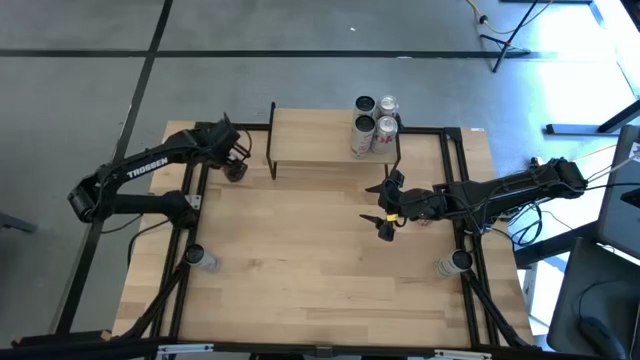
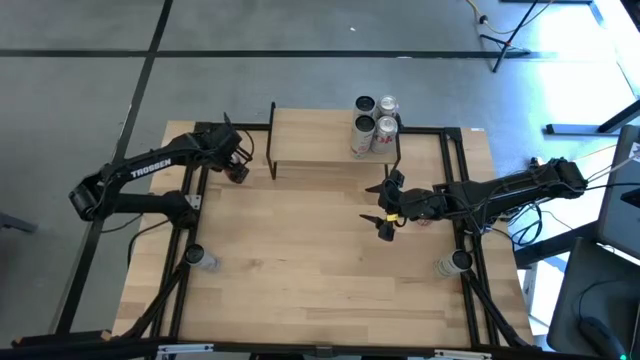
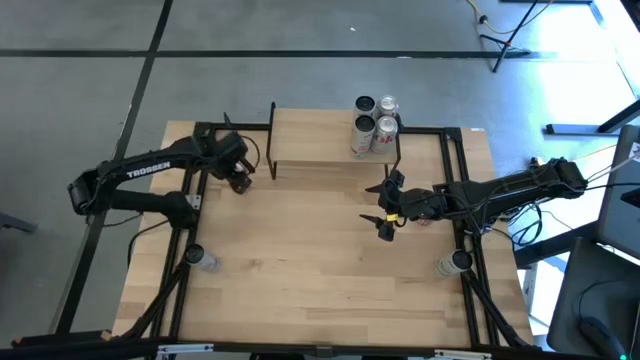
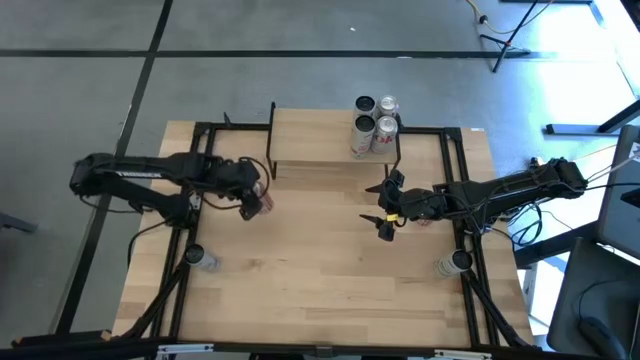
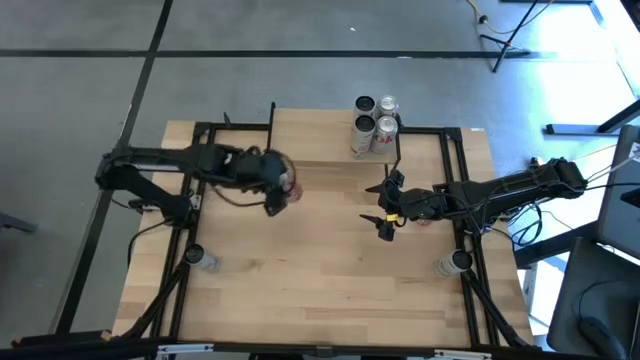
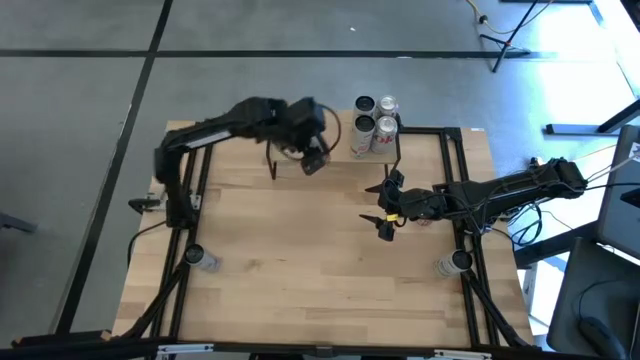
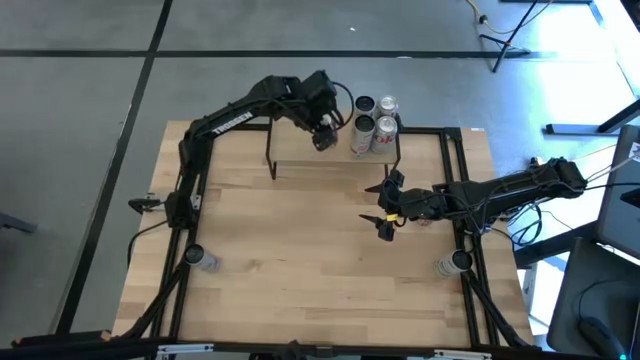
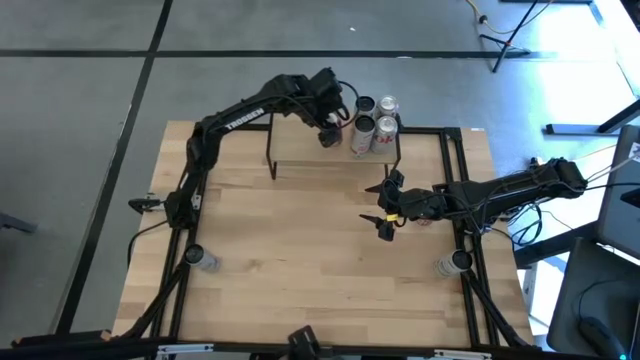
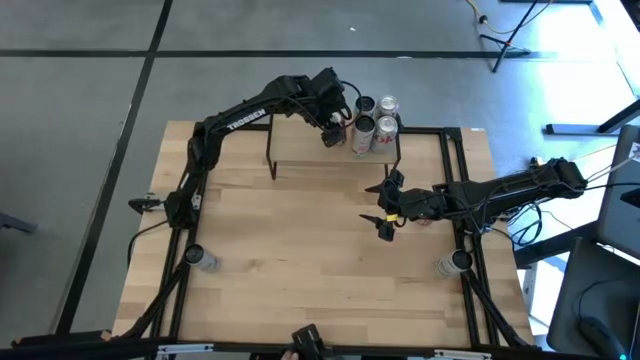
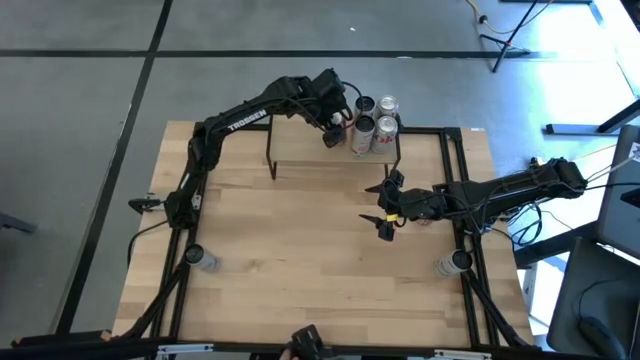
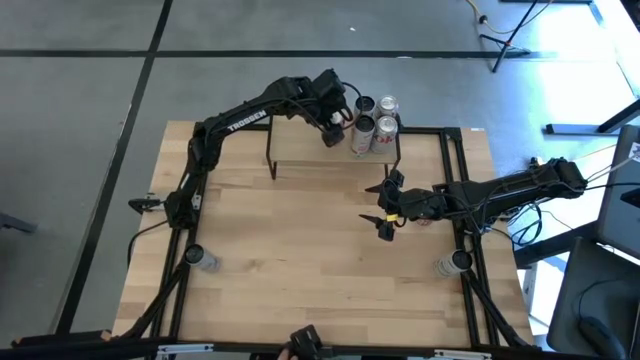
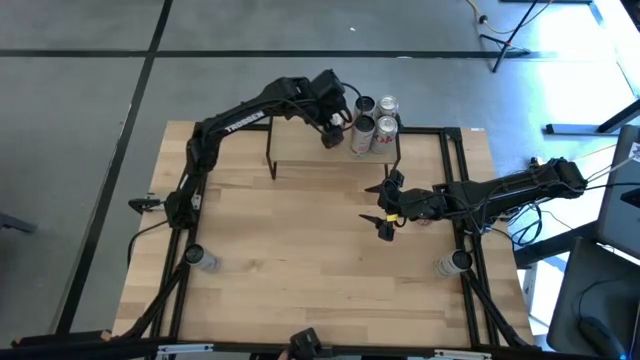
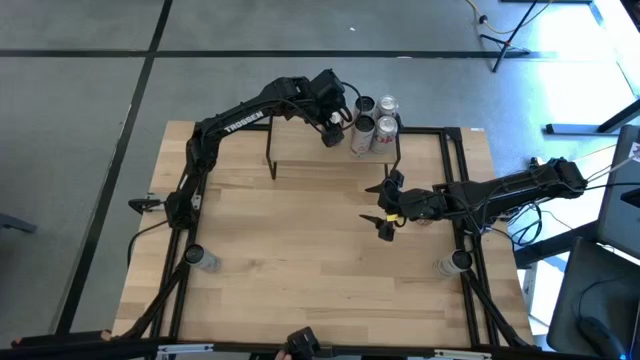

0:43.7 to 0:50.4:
Task: Place canned beverage on shelf
Put the left black-red soda can on the shelf

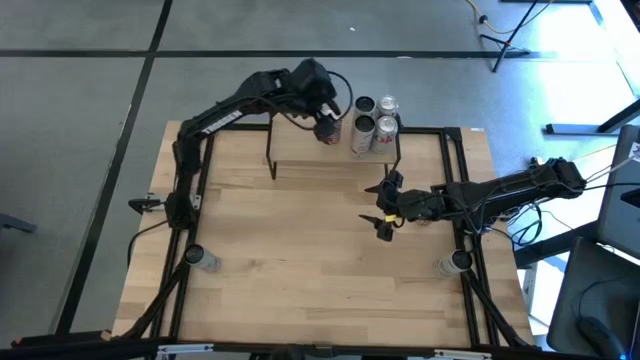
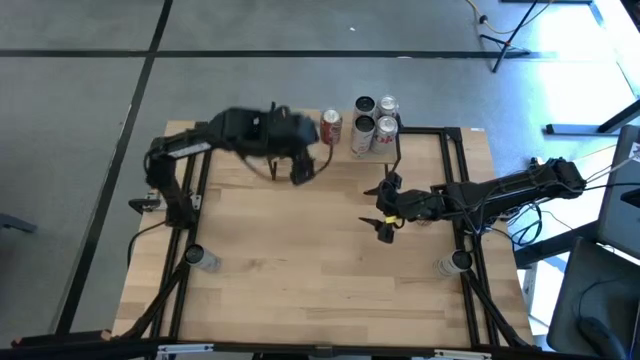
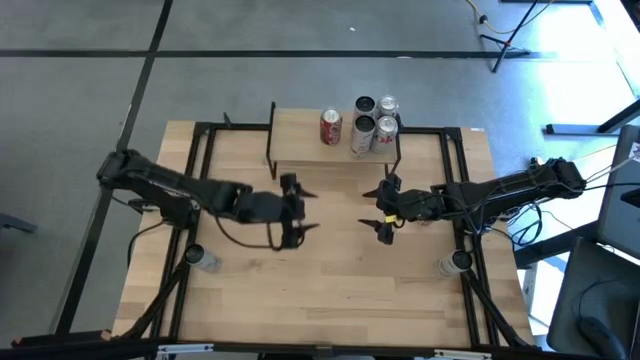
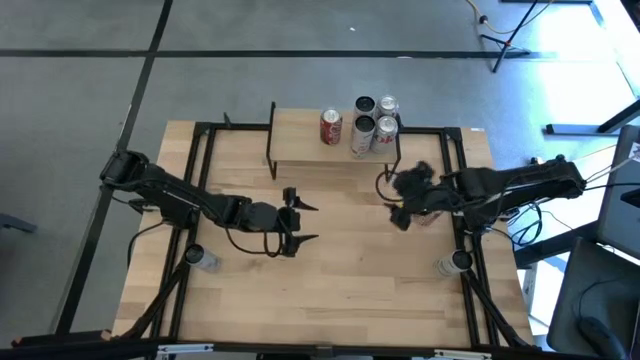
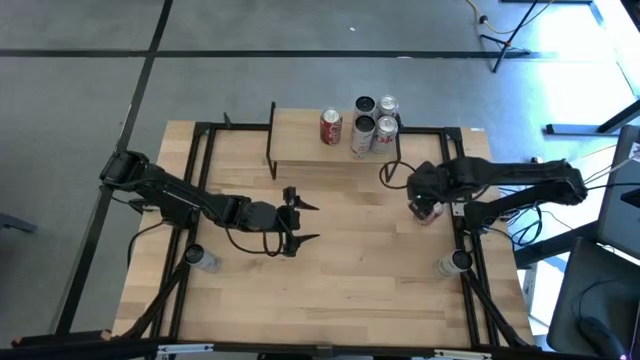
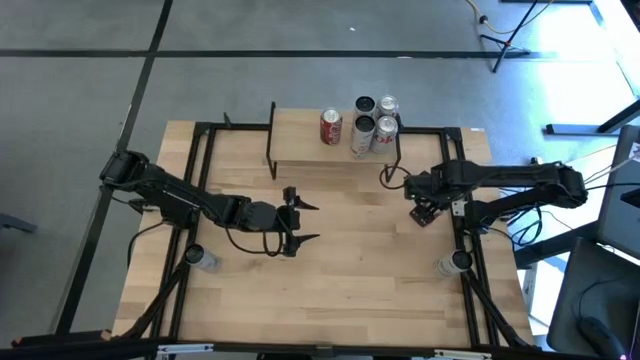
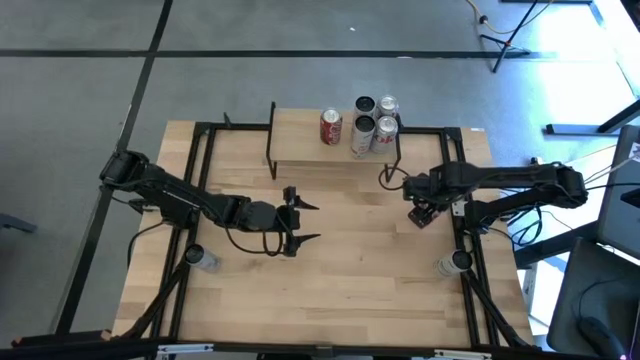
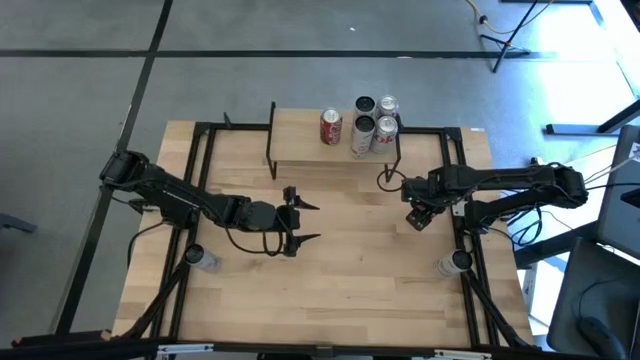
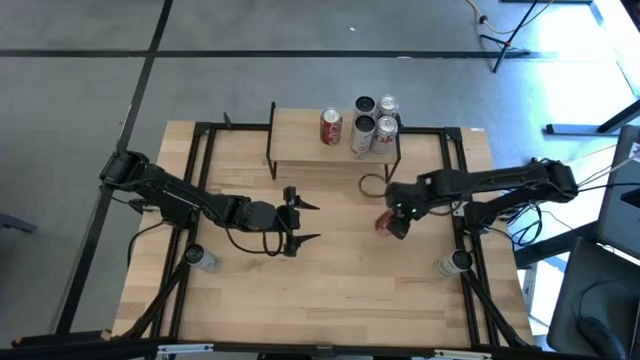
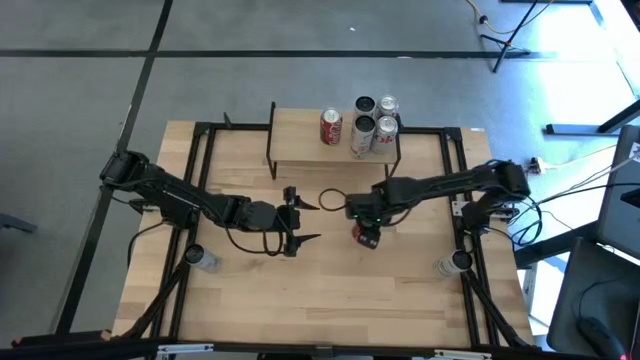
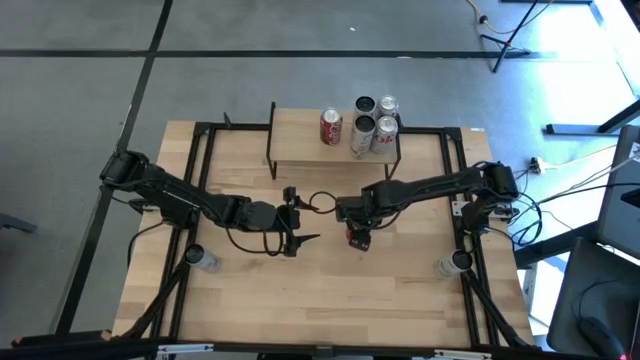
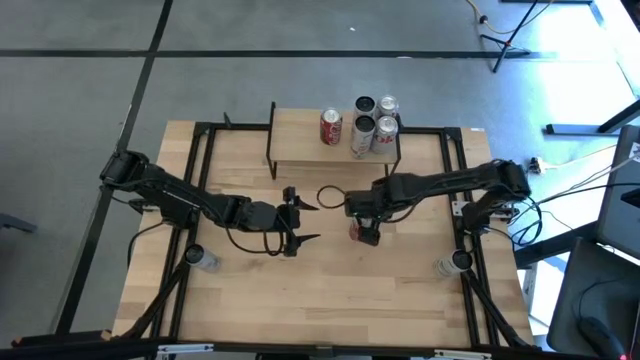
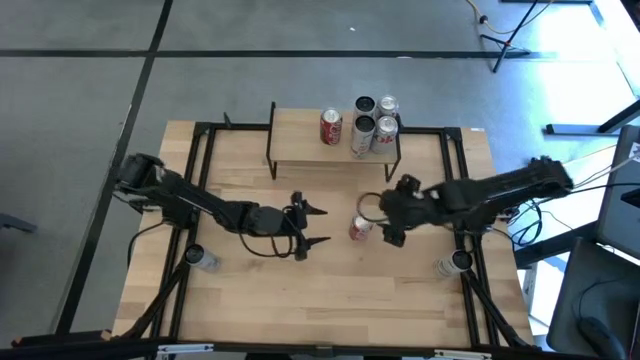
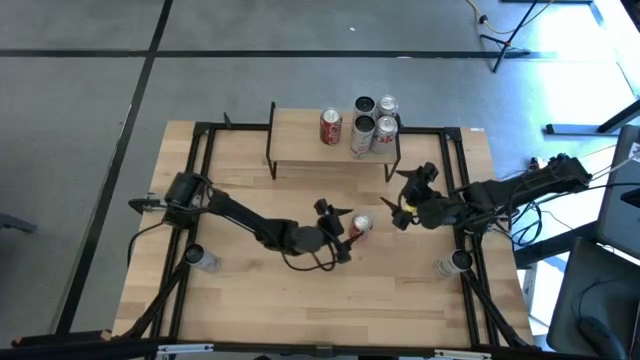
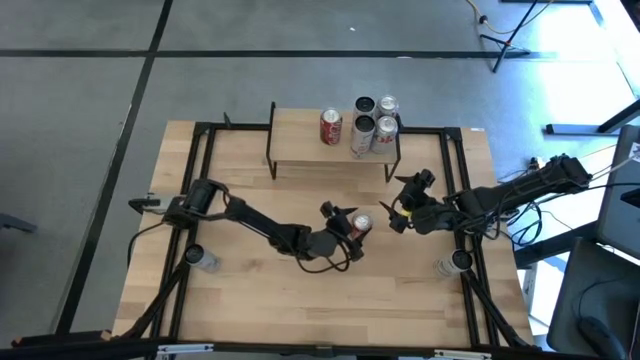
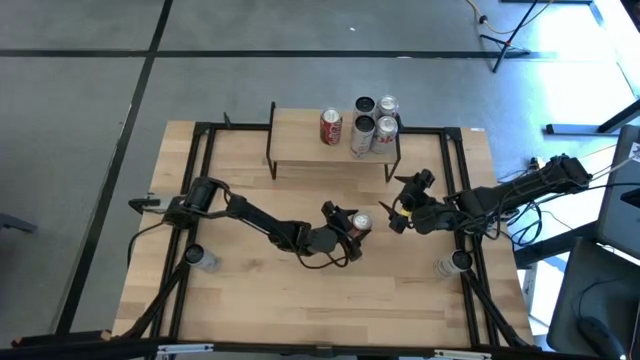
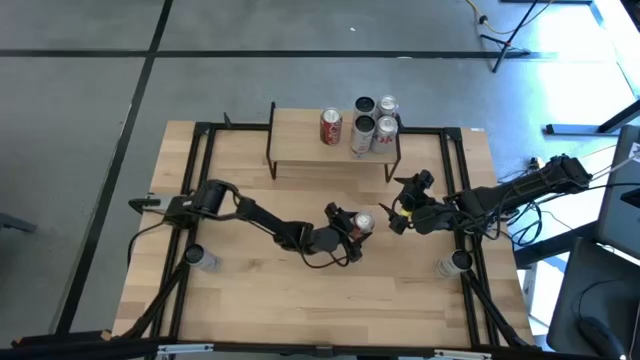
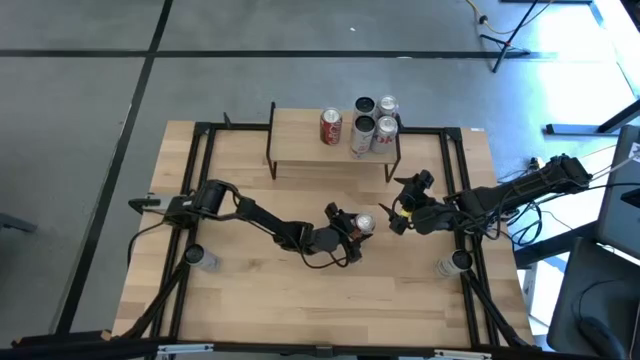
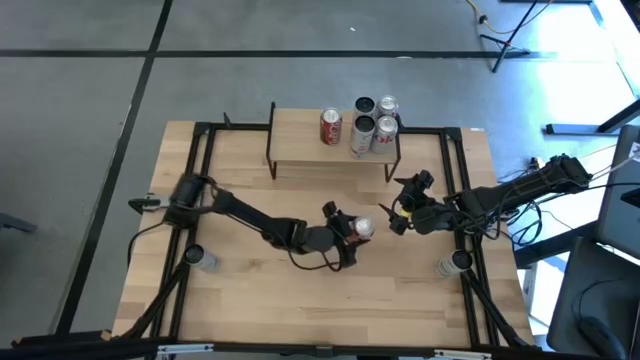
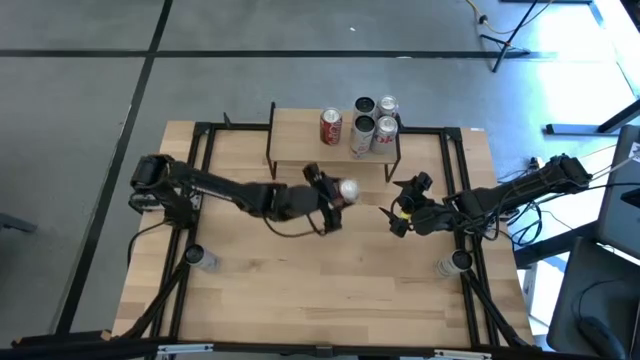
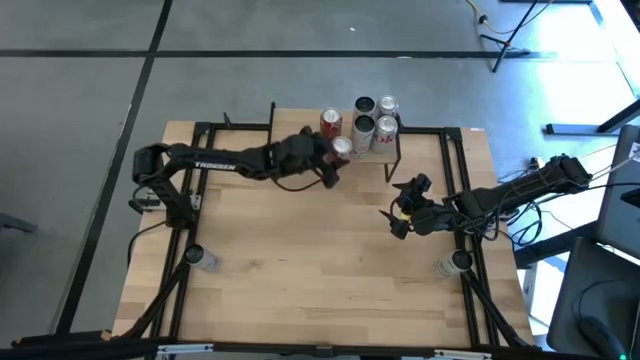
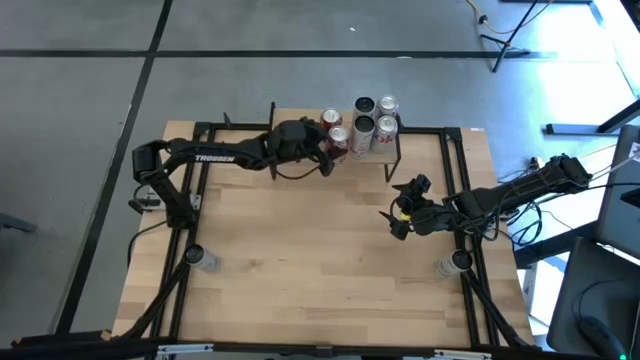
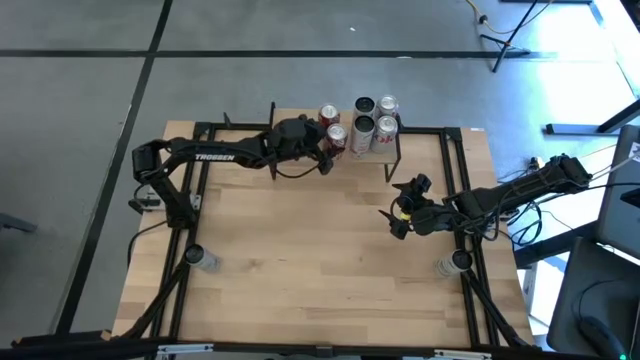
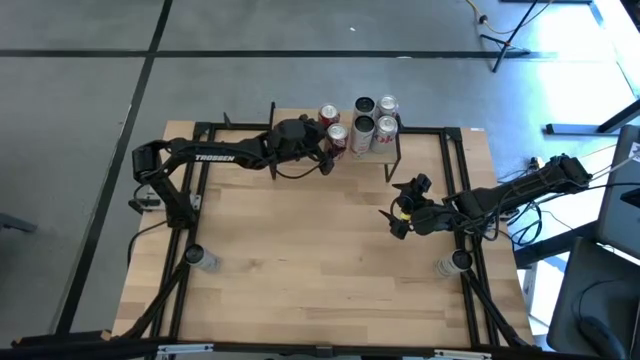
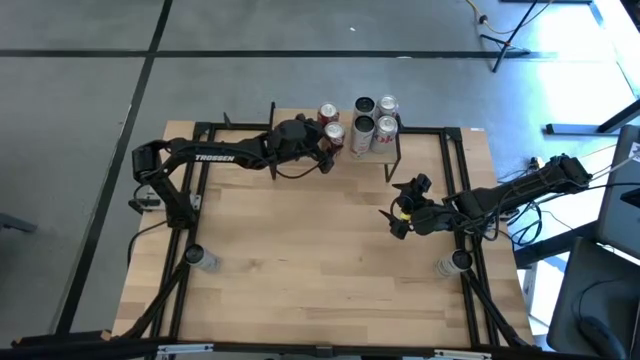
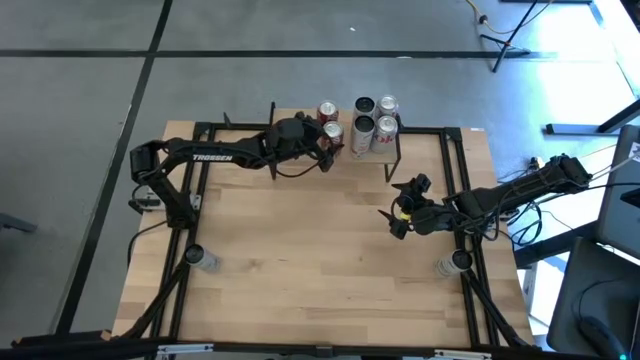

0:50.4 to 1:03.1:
Put the black-red soda can on the shelf aligned with the other black-red soda can

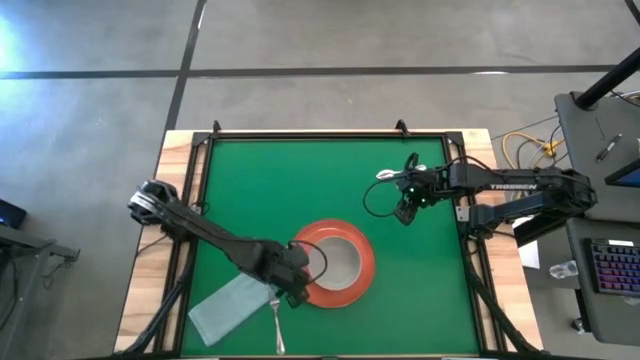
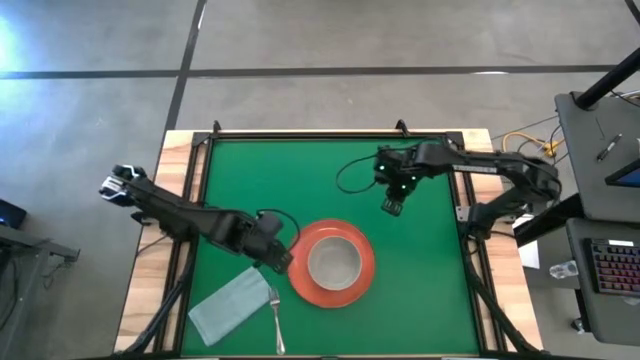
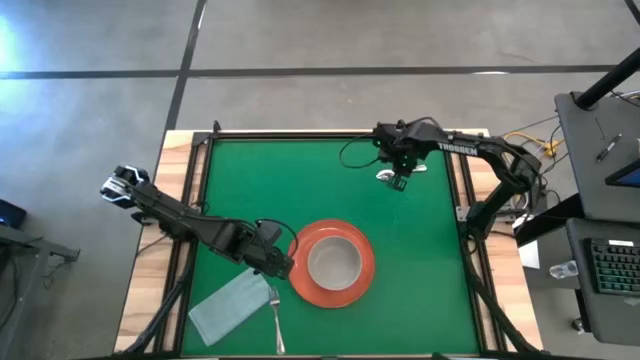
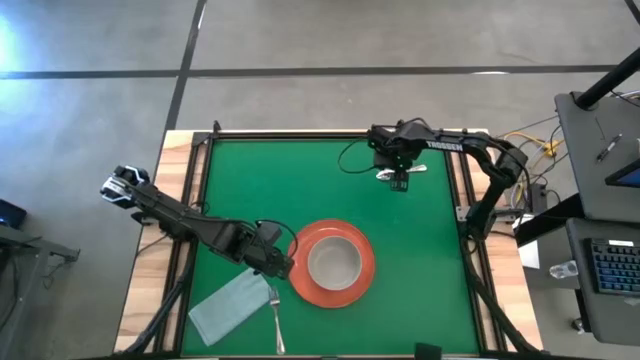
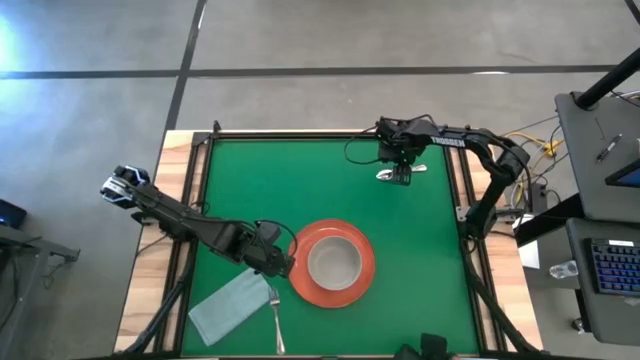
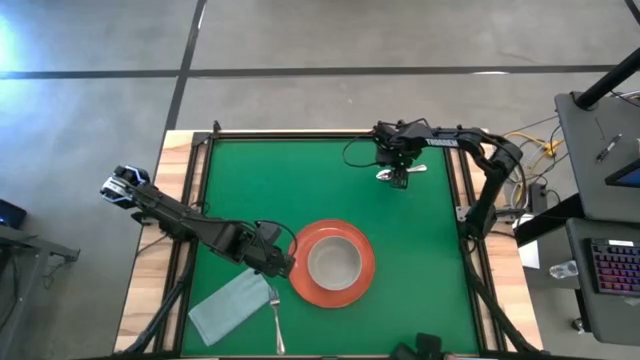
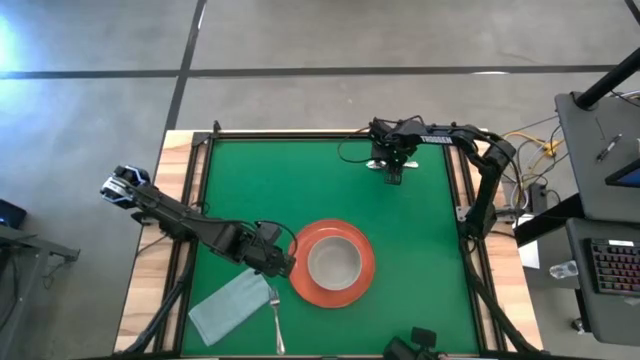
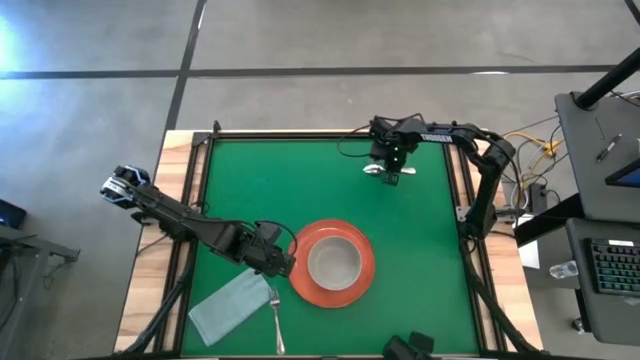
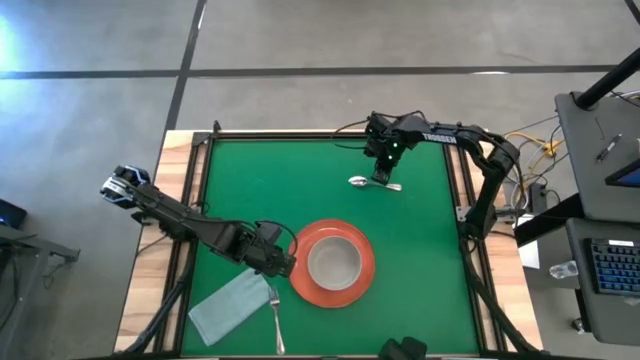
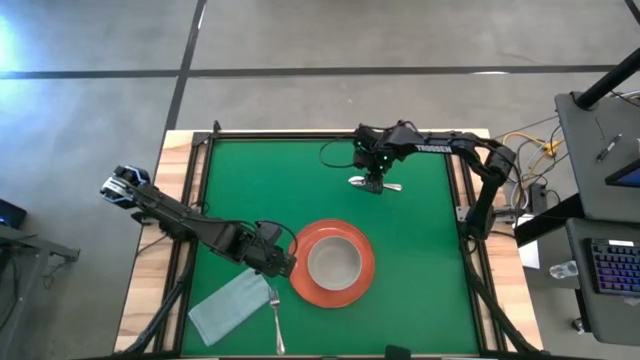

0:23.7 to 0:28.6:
Task: Set table place
Put the silver spoon into the gray bowl
